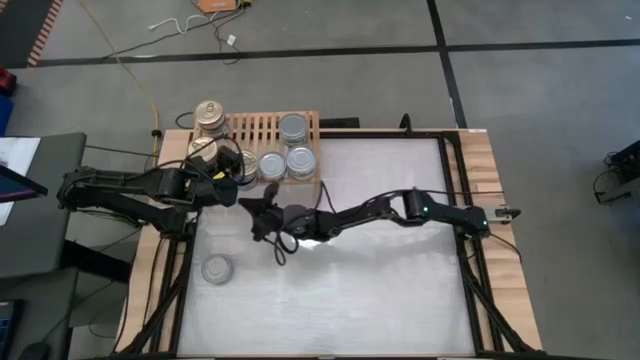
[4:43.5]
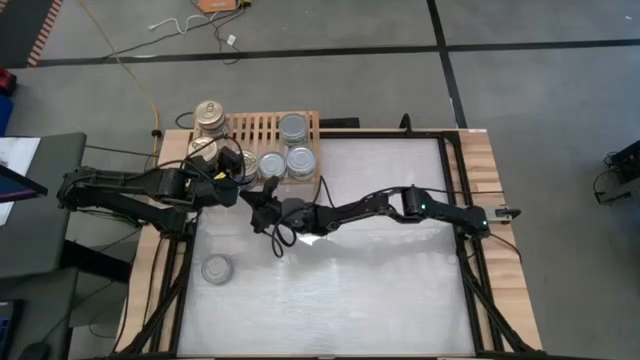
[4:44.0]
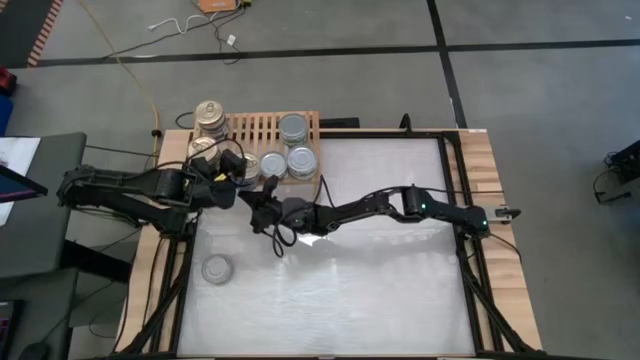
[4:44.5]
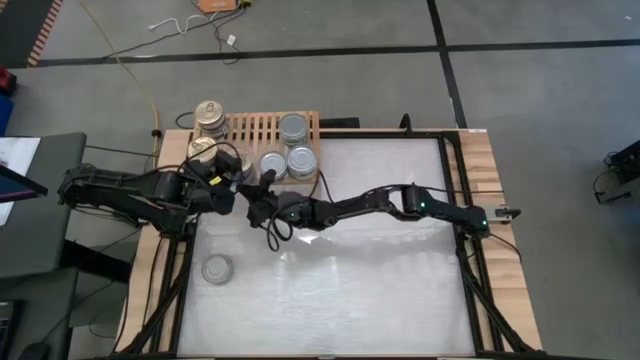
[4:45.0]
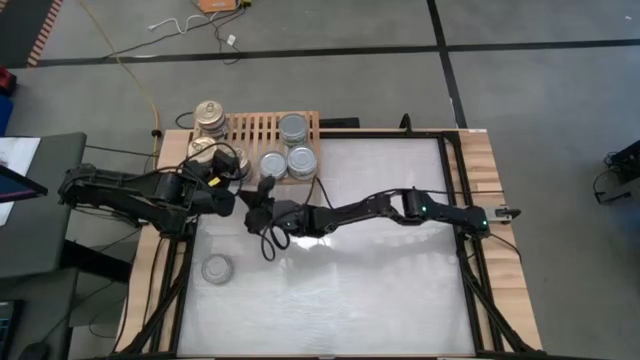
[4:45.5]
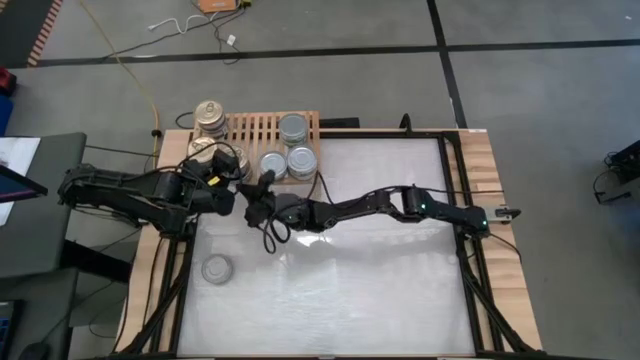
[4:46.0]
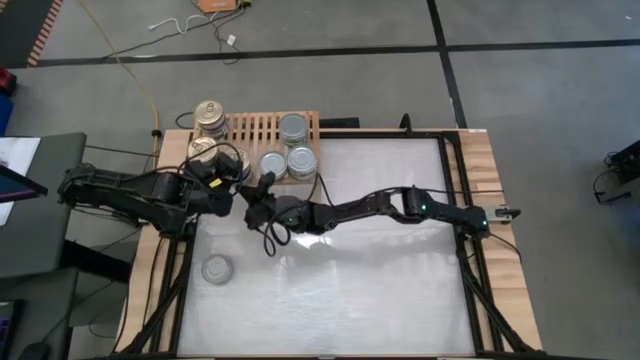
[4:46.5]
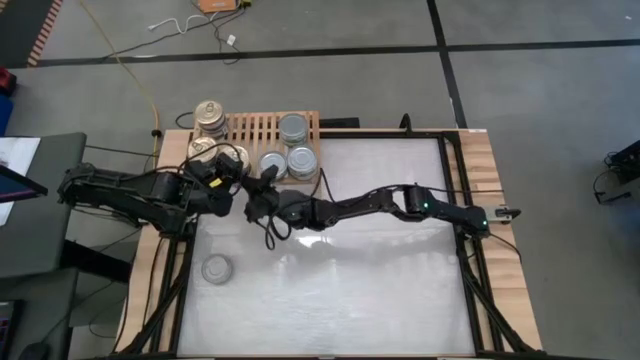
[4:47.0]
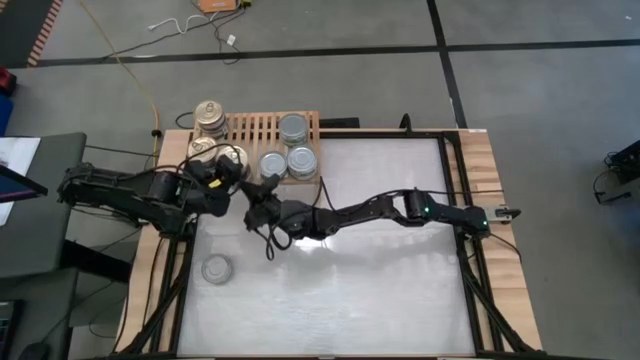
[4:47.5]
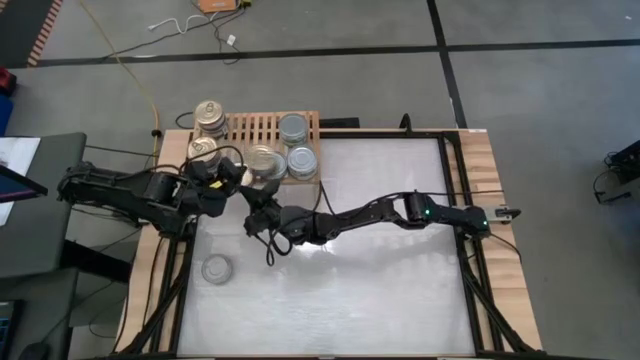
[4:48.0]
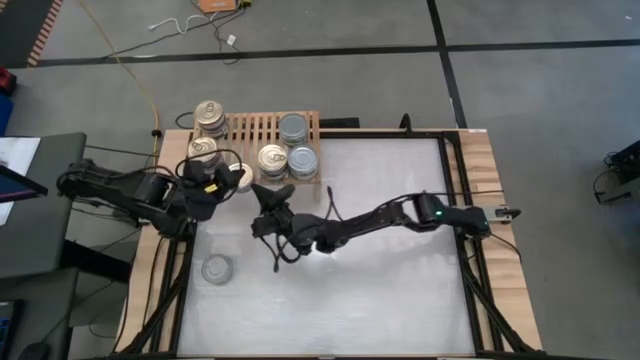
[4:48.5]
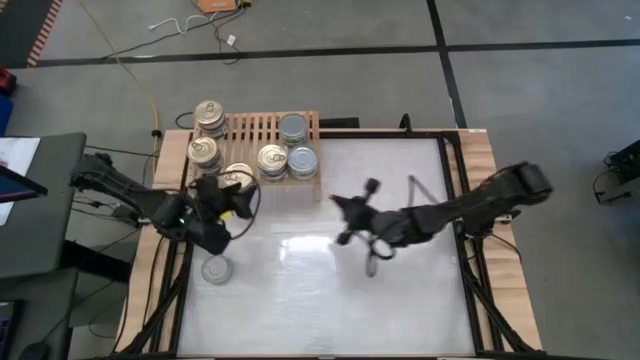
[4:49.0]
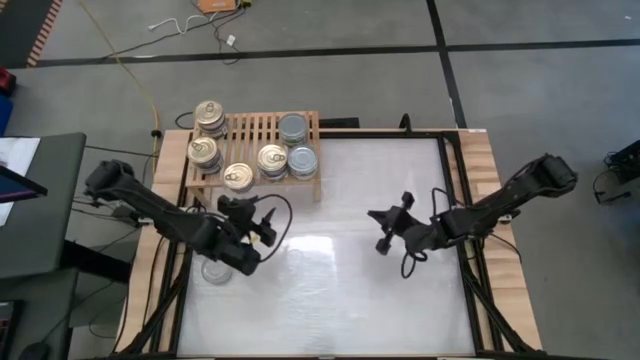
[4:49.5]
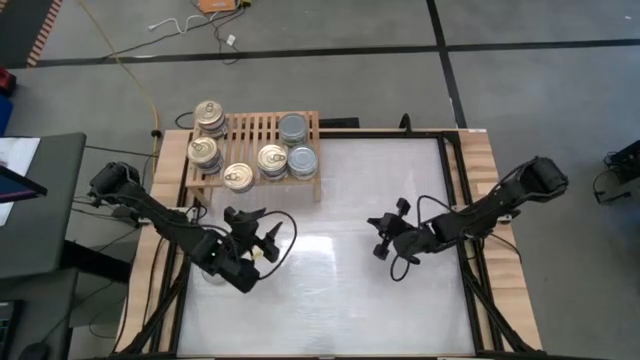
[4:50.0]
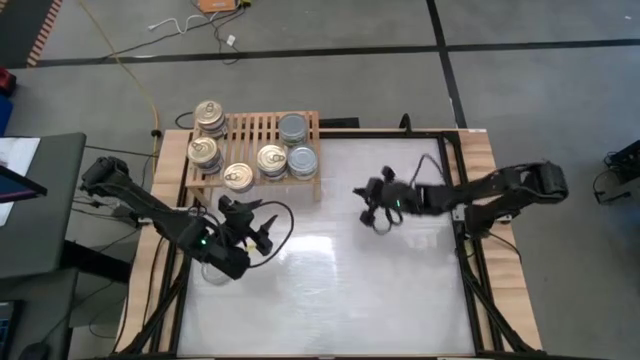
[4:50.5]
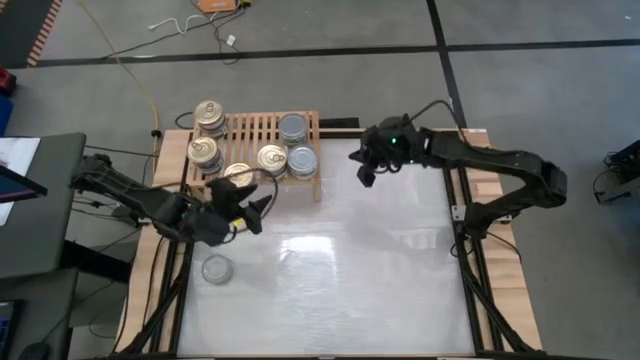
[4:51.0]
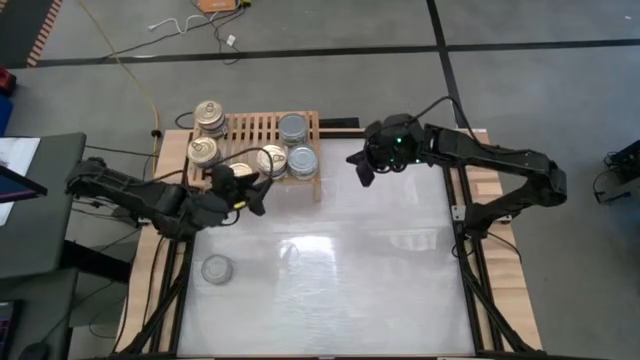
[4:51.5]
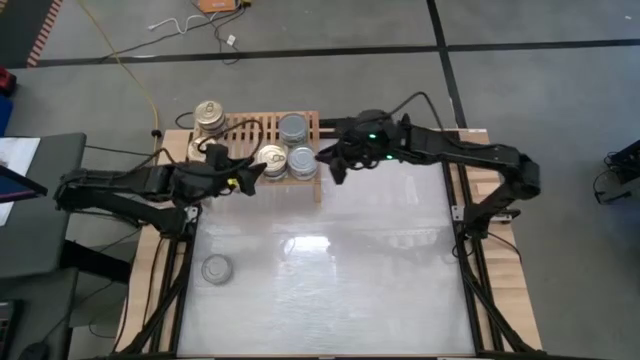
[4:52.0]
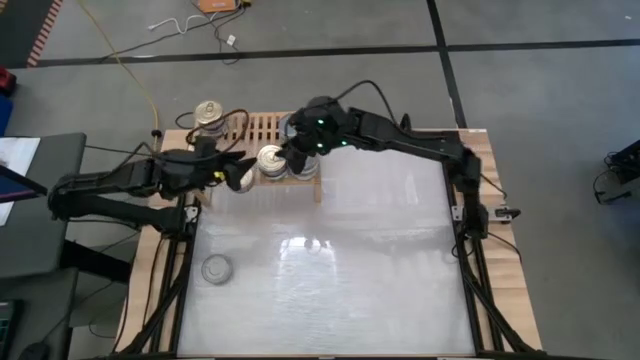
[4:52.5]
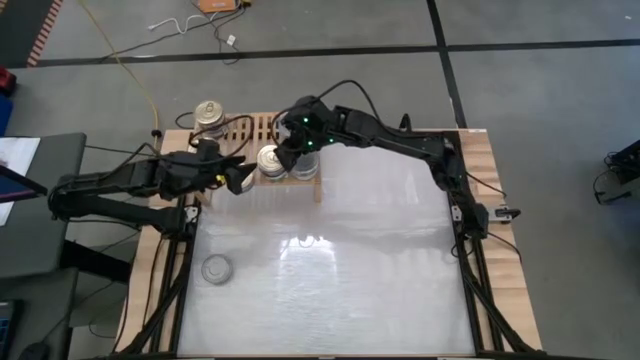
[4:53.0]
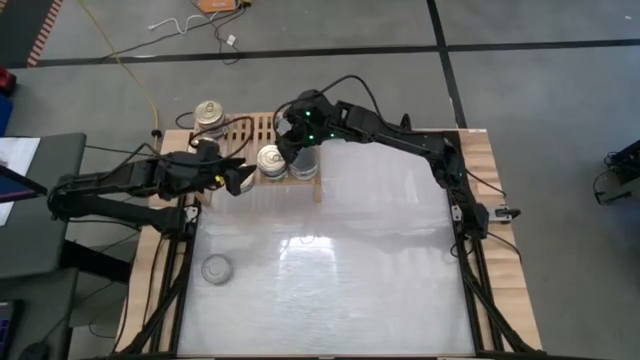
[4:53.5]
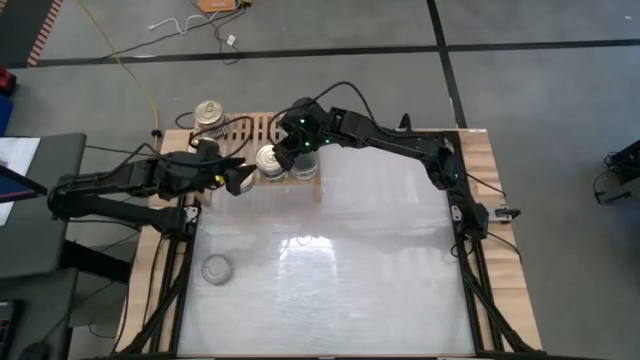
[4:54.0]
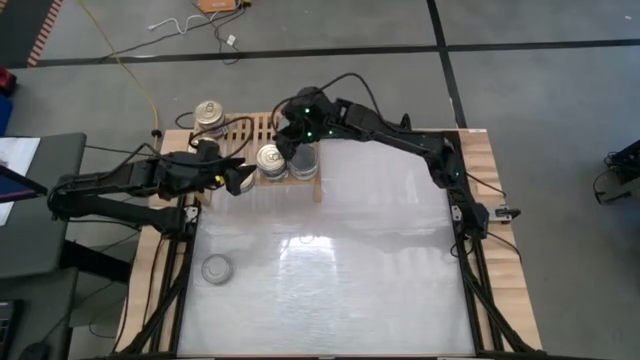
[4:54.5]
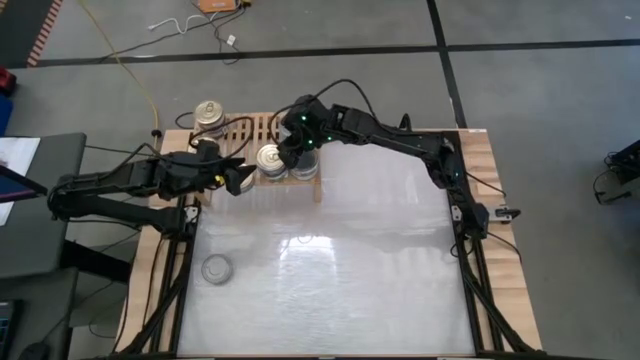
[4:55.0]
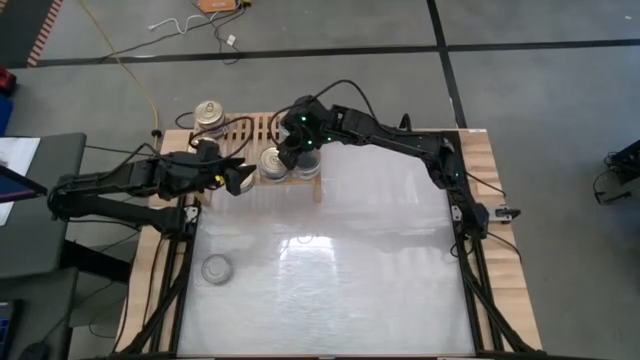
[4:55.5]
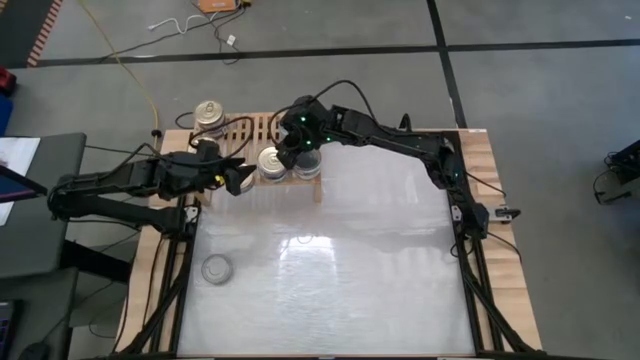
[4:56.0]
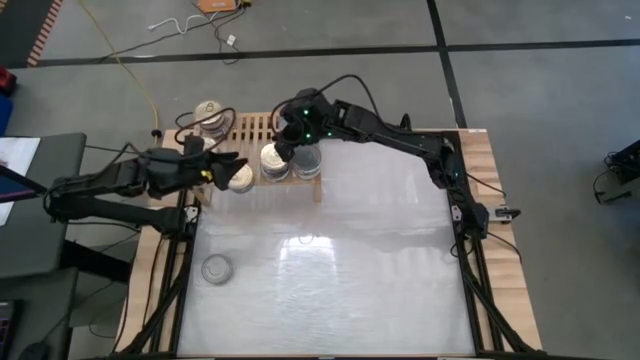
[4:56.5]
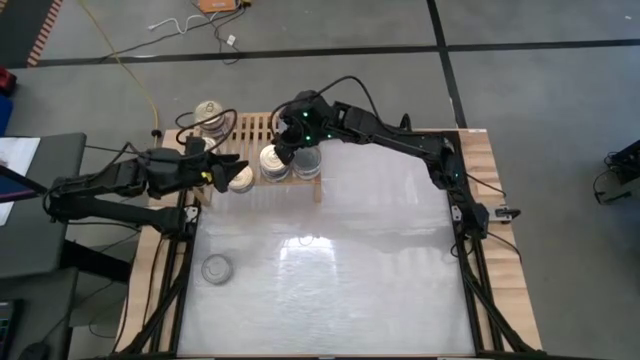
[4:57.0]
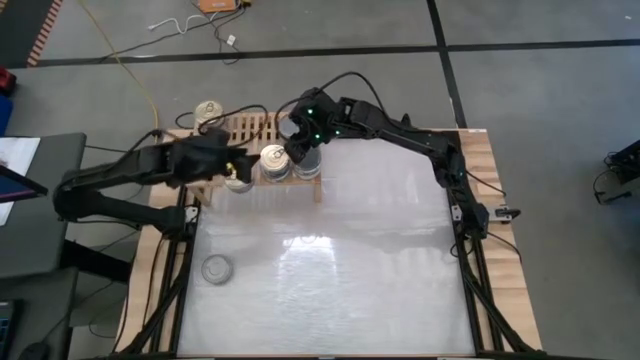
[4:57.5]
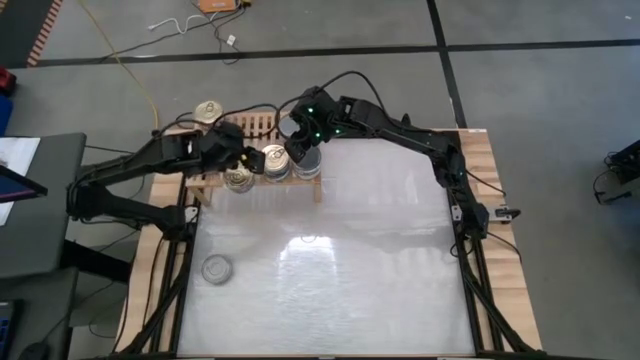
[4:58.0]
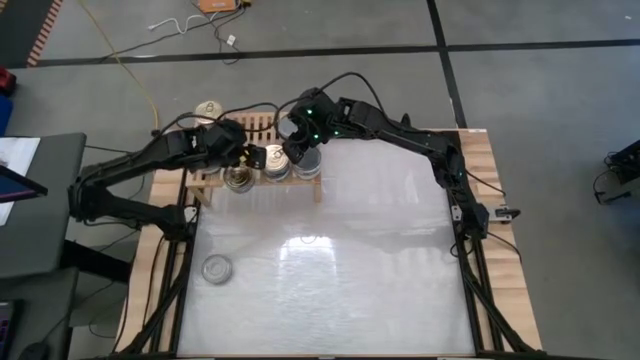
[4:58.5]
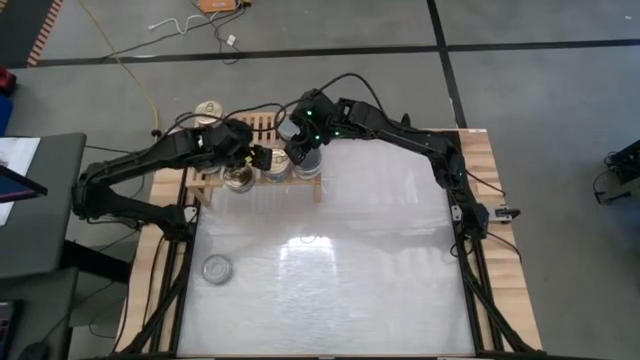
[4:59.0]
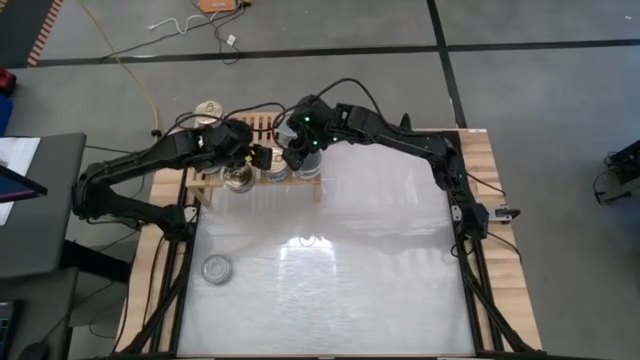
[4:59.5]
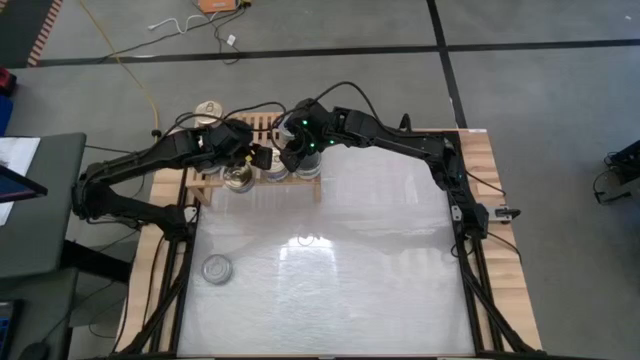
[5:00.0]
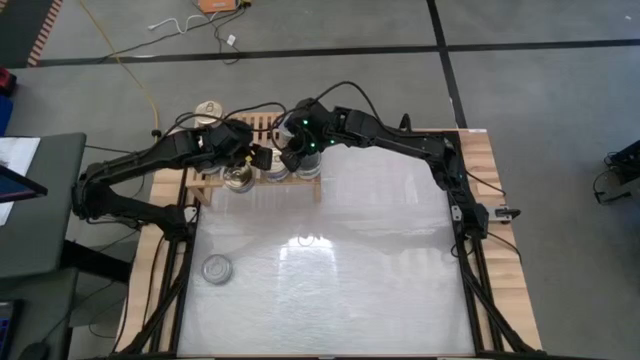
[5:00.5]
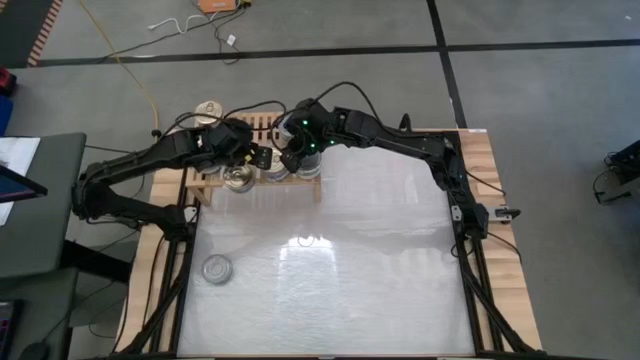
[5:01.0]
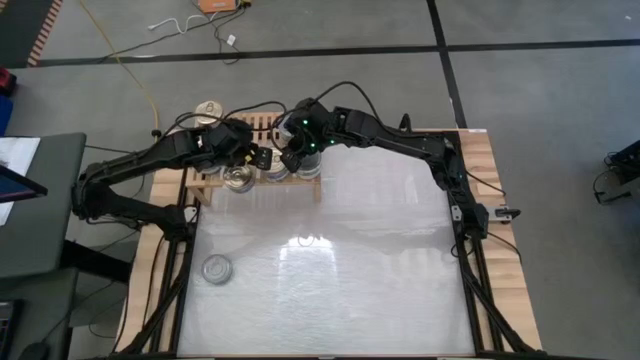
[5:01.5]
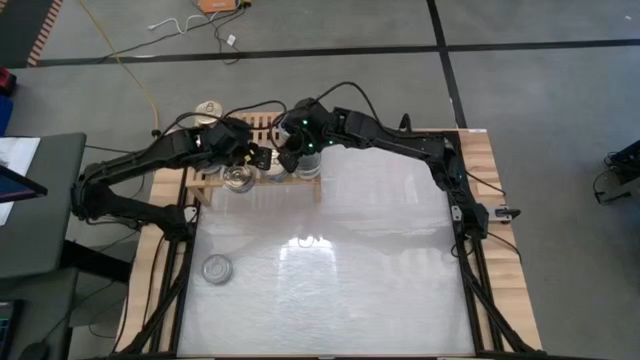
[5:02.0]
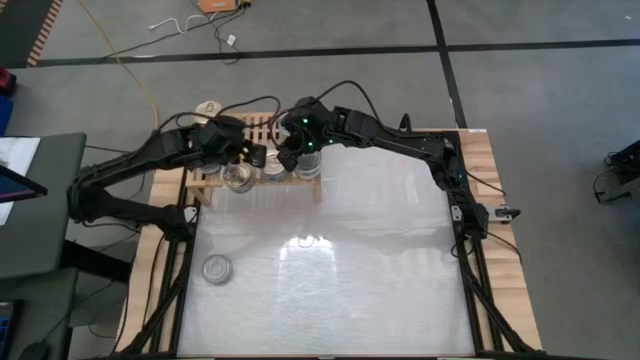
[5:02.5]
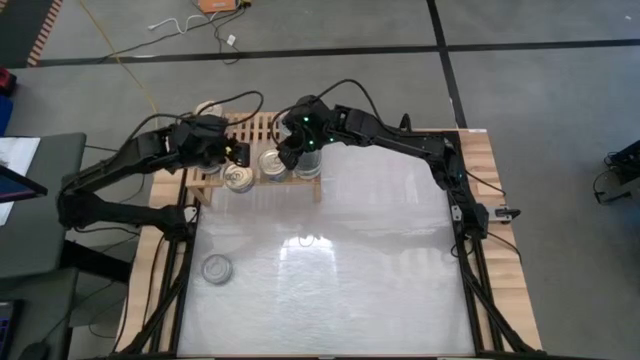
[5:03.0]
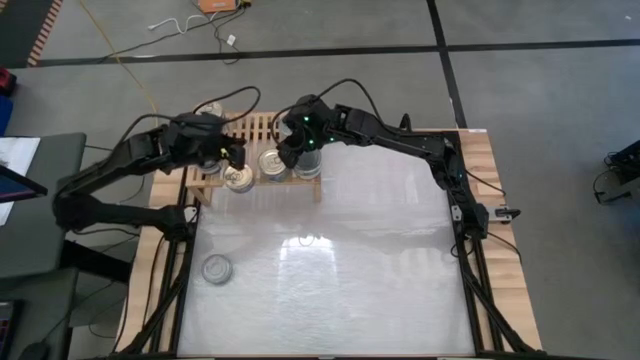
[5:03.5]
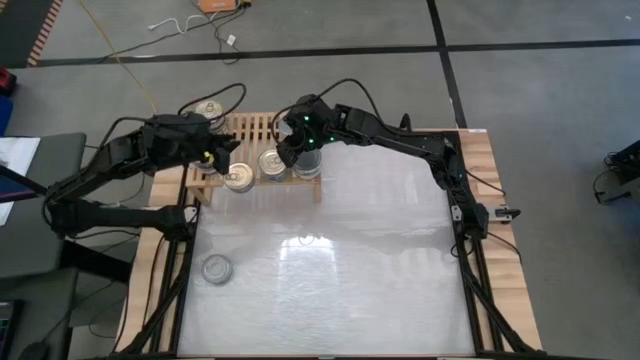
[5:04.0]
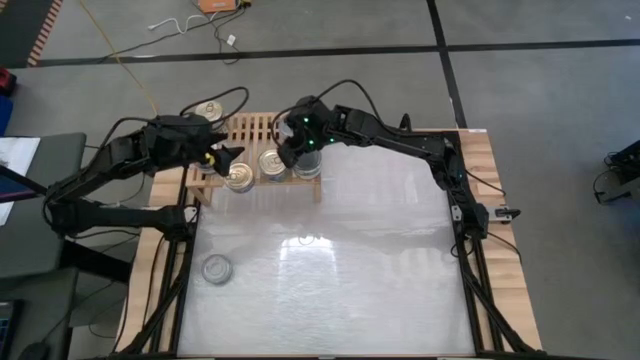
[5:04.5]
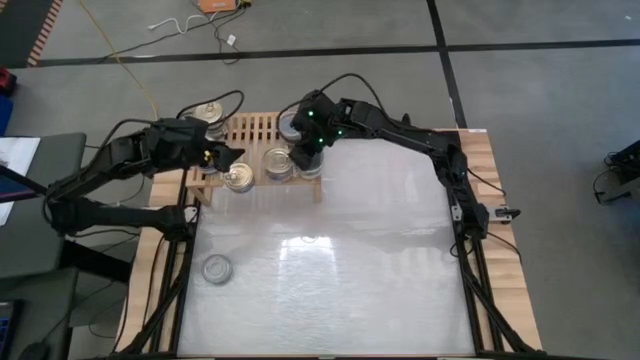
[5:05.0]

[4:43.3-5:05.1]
Task: Stack canned seafood by type on shelf
Stack the blue tuna can on top of the bottom right blue tuna can on the shelf

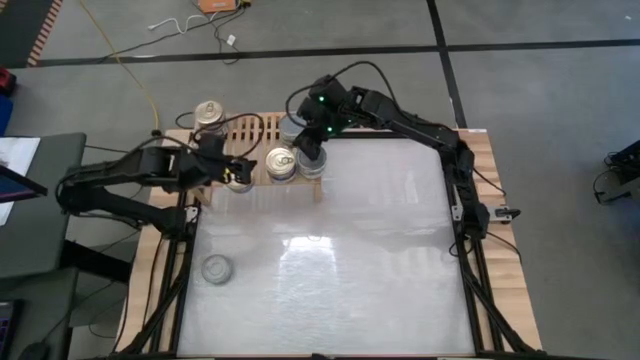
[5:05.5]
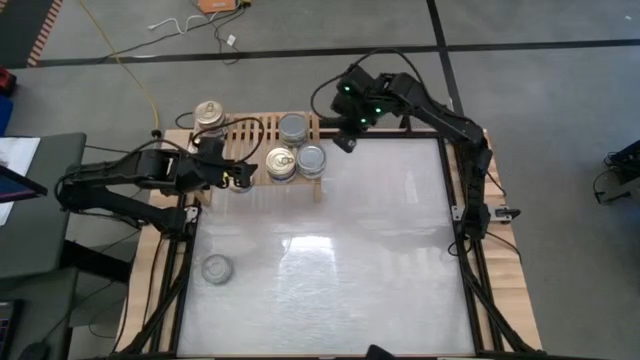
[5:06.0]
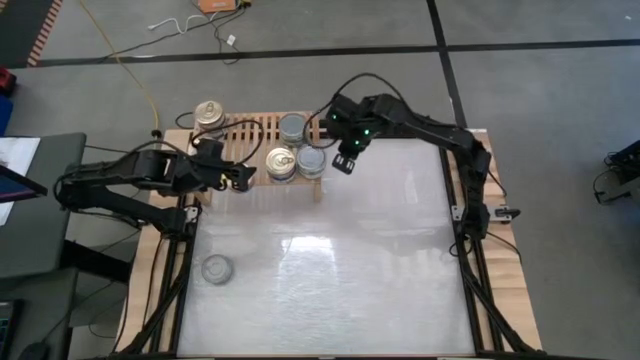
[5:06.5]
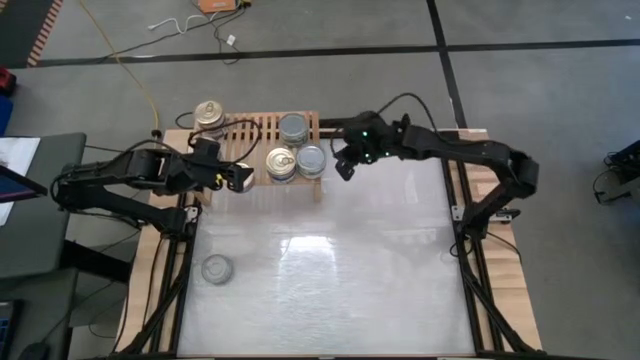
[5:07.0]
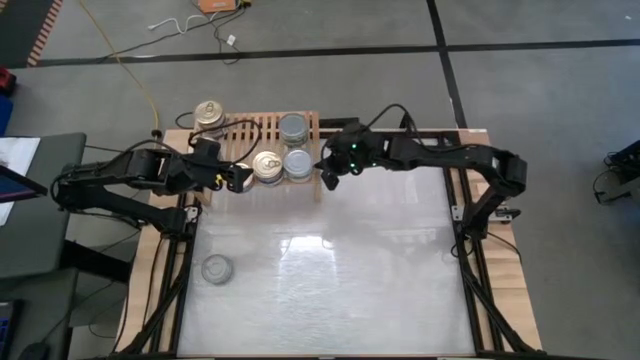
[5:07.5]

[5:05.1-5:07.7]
Adjust the bottom right stacked green tuna cans
